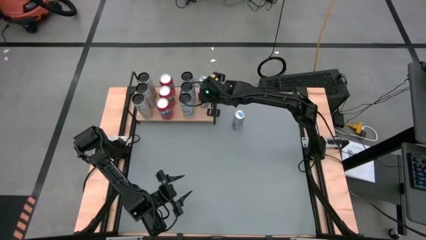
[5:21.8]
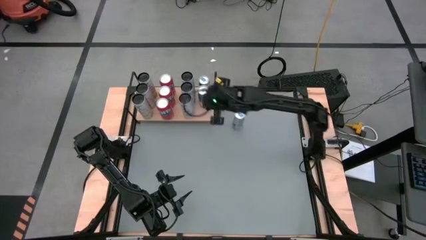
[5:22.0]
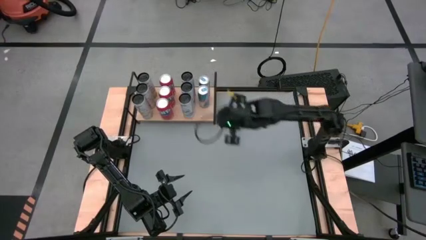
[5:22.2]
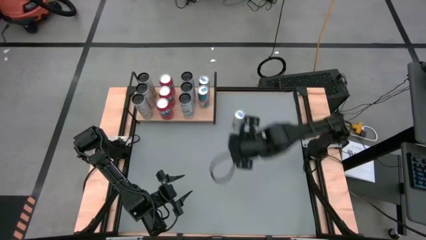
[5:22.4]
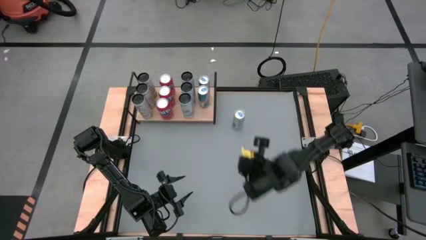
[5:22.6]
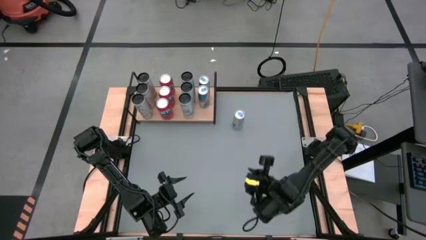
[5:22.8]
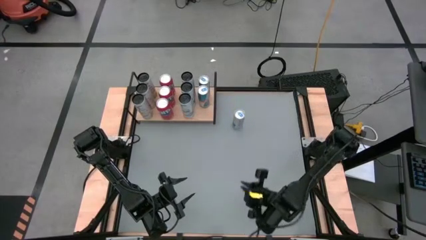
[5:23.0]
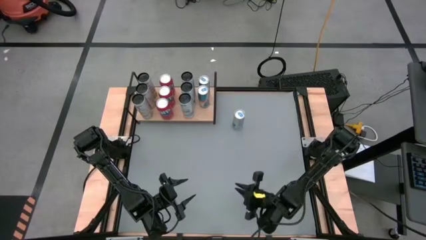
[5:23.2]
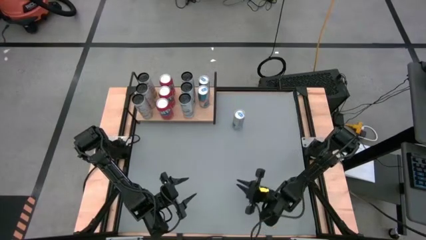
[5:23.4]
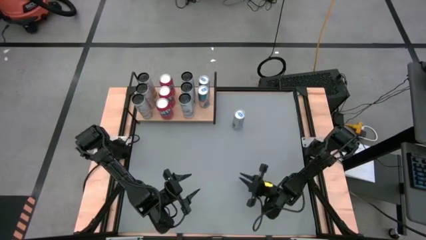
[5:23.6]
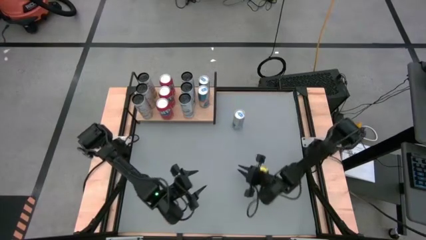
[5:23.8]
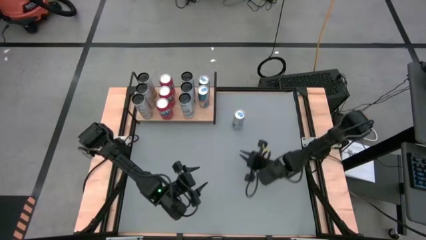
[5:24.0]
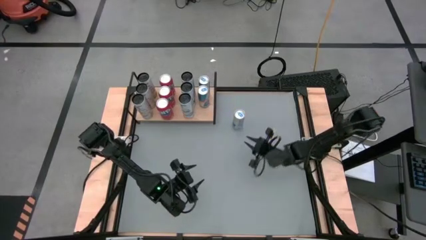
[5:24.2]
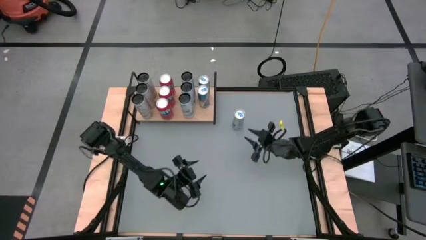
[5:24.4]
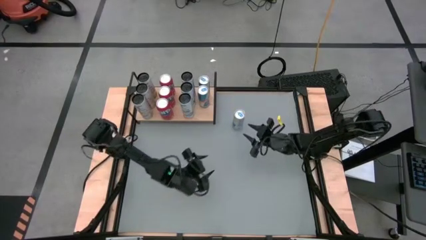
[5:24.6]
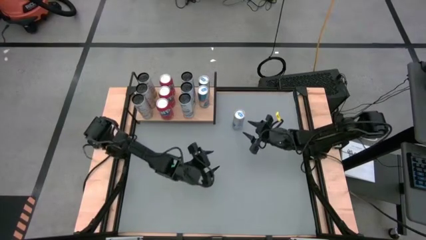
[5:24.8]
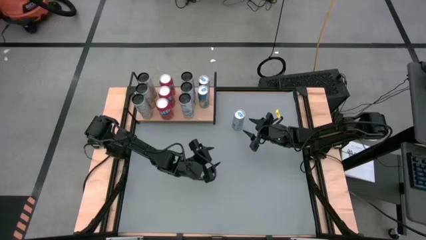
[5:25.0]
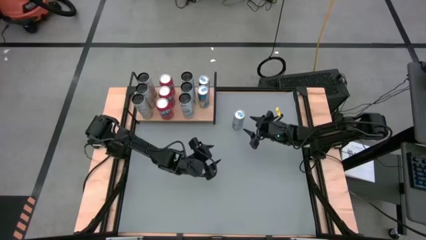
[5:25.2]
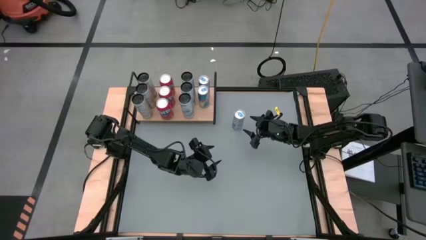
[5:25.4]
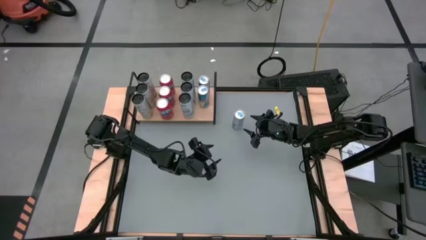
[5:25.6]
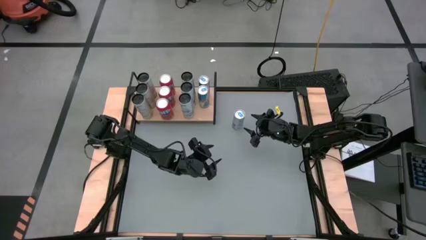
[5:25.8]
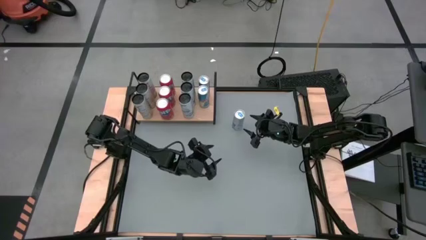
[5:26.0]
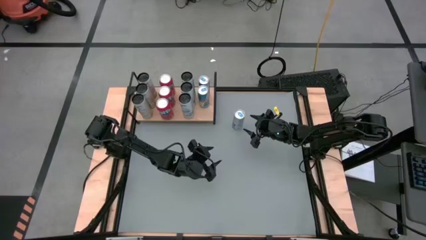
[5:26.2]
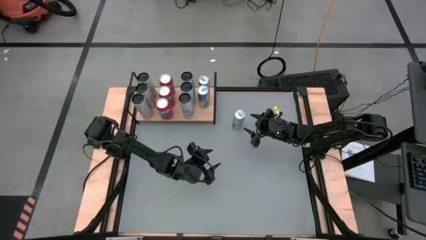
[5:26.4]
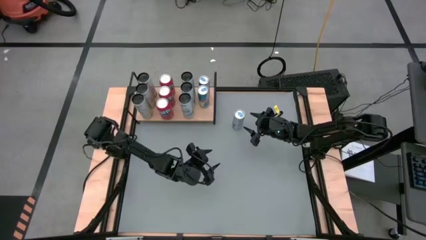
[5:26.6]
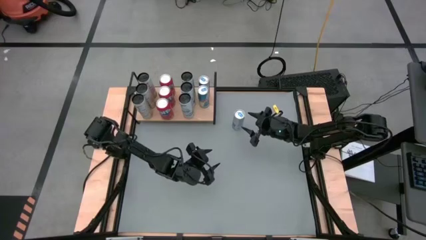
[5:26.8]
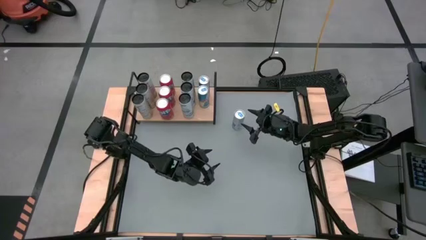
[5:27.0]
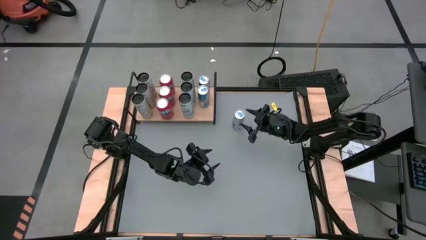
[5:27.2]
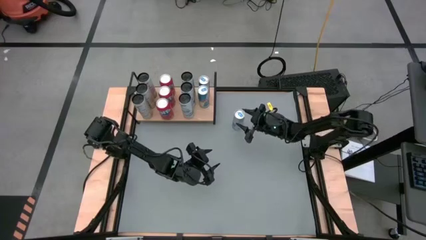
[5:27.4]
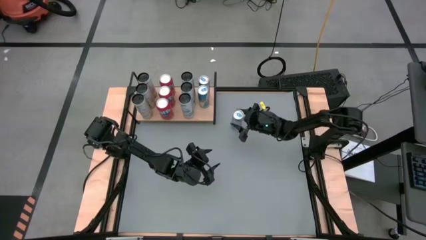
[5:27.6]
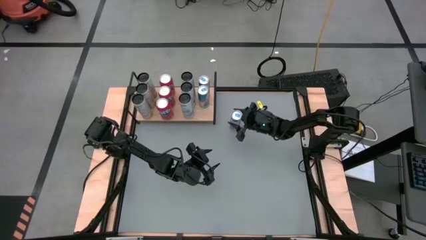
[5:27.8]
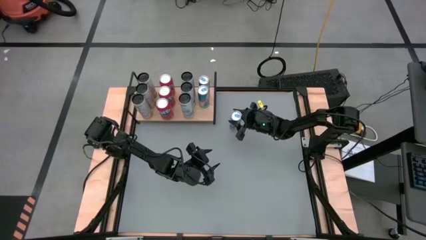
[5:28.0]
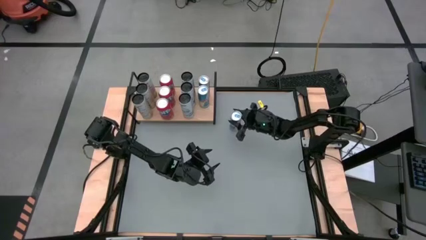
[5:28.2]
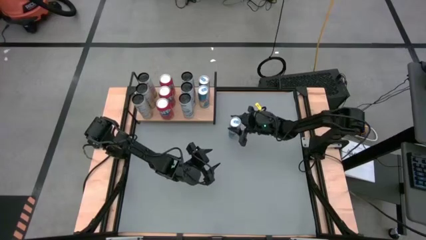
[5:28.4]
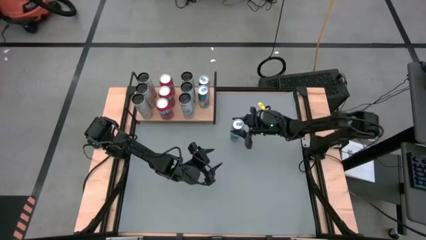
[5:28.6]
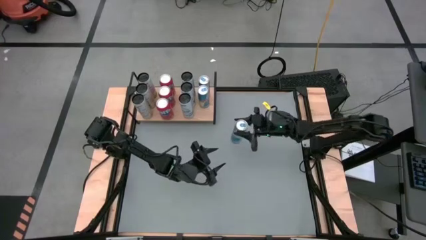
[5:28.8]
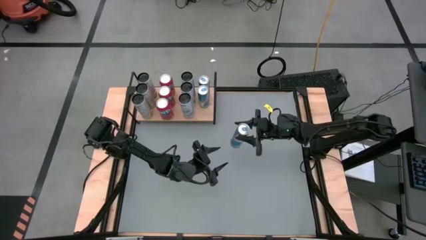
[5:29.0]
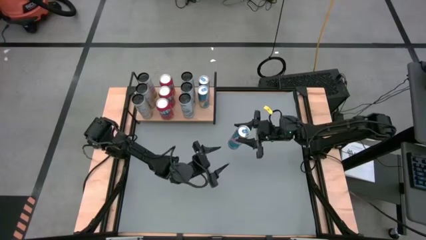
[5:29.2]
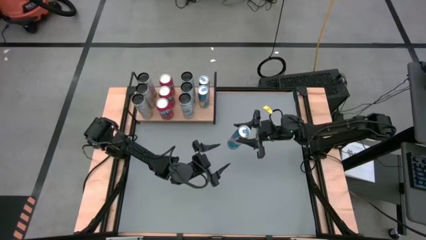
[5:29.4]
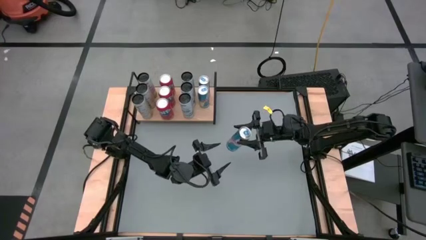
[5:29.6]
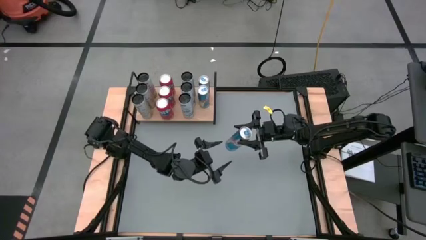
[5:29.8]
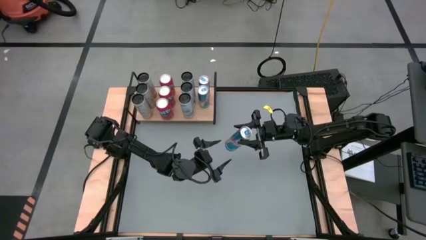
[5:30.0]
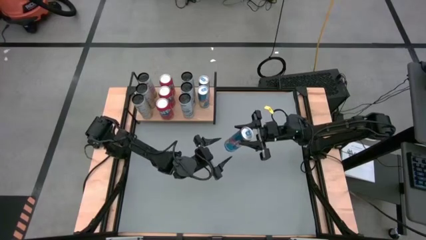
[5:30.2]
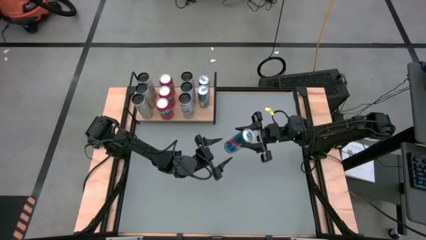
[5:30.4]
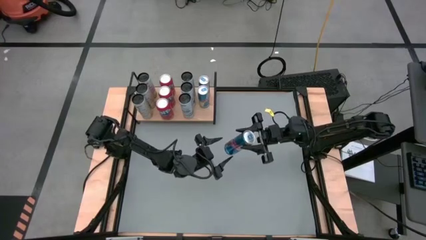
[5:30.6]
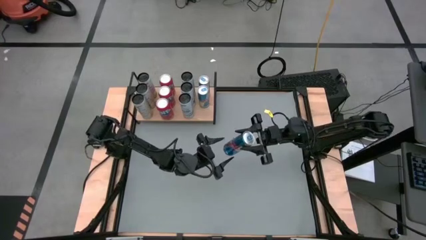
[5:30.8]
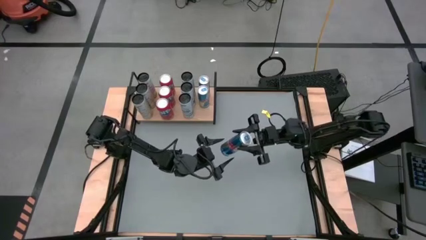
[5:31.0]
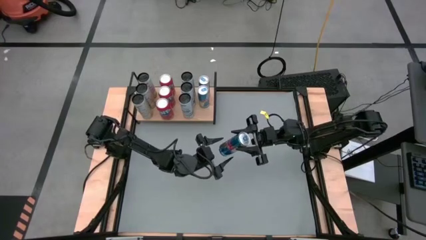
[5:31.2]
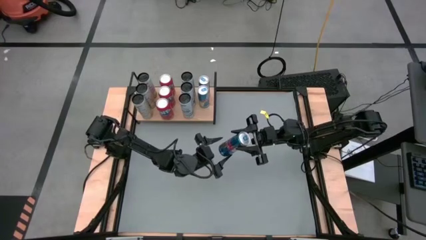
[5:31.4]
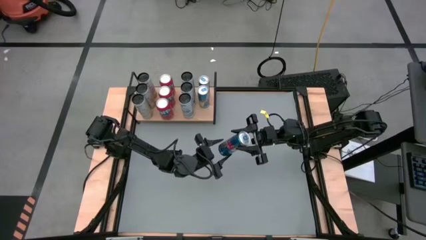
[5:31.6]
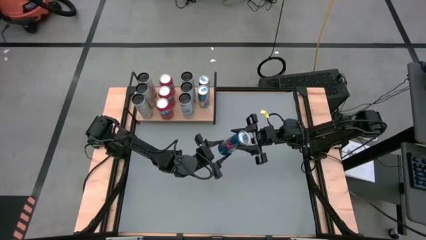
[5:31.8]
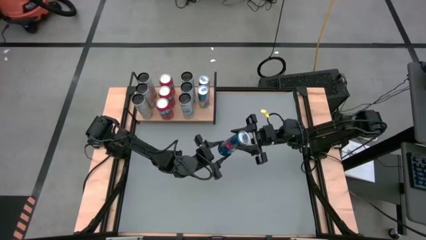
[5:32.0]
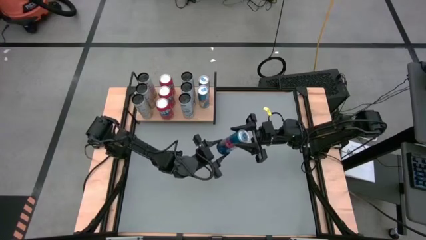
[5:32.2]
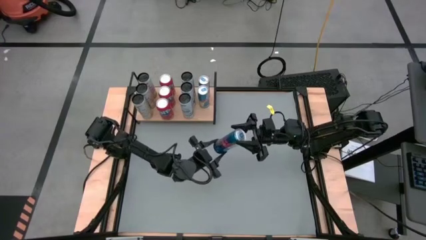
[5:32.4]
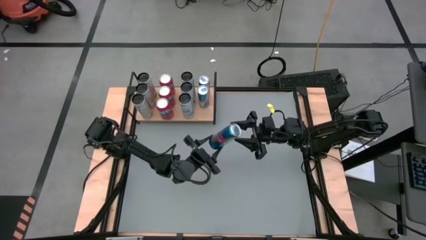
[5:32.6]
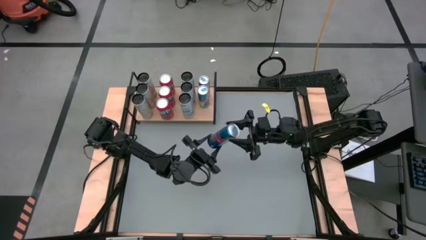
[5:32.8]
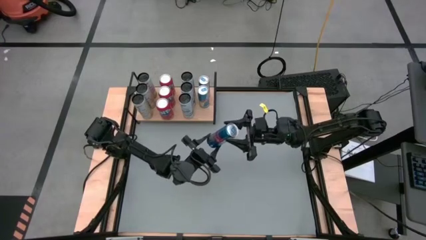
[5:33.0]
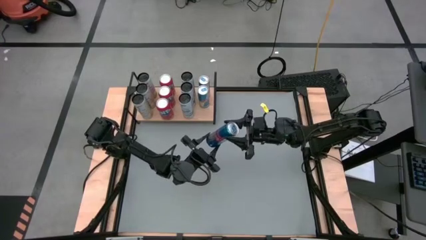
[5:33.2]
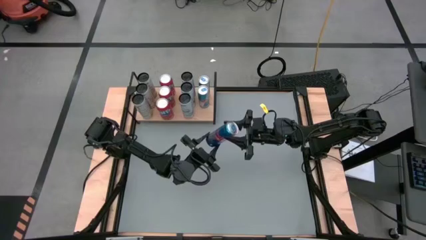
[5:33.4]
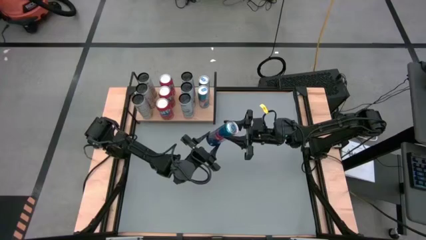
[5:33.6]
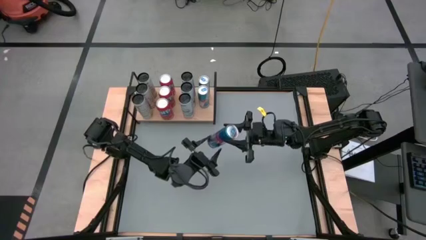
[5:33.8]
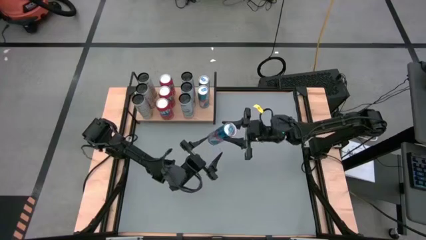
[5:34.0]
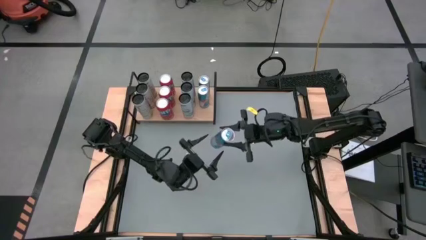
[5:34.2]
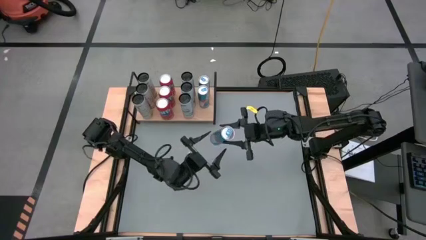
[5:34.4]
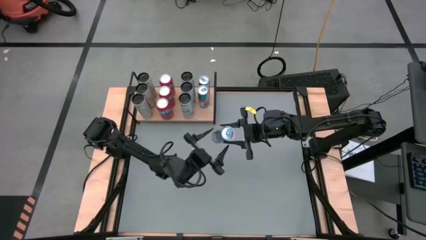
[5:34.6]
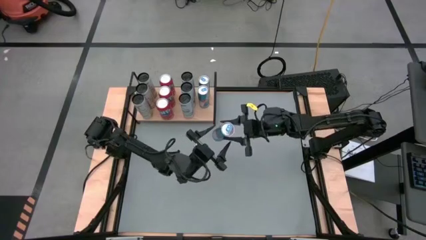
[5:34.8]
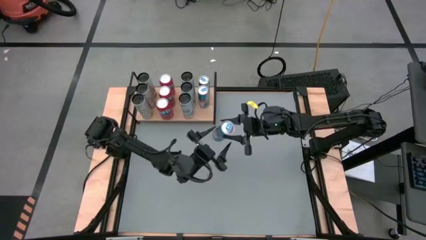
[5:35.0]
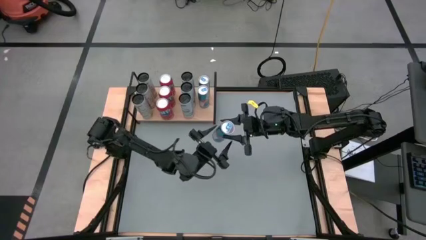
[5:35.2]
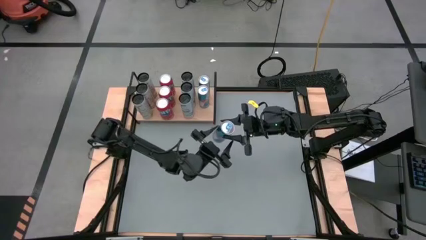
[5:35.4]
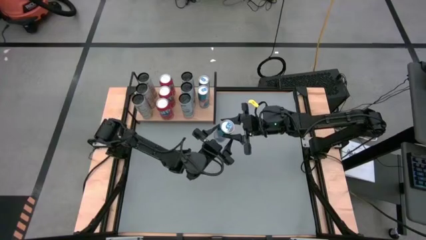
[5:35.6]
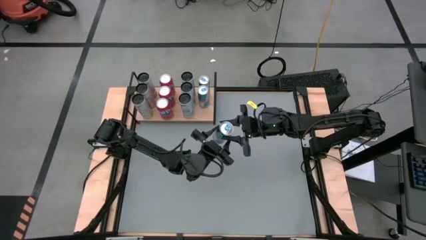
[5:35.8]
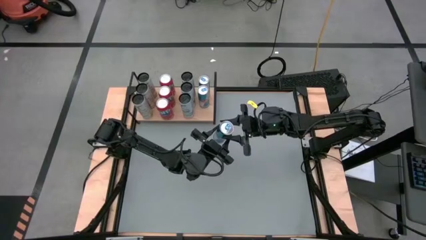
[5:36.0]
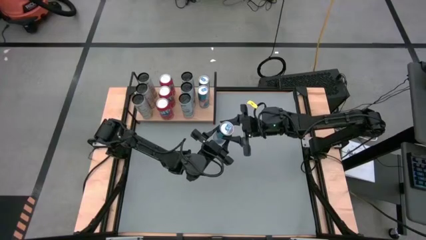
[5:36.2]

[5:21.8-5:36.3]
Task: Place canned beverage on shelf
Put the blue soda can on the shelf aligned with the other blue soda can
